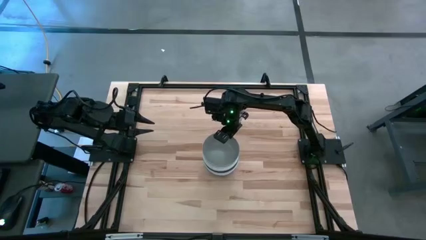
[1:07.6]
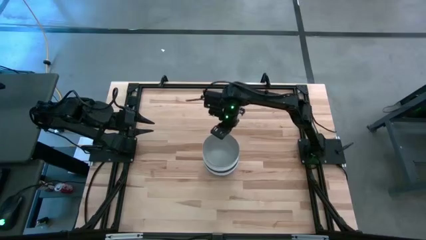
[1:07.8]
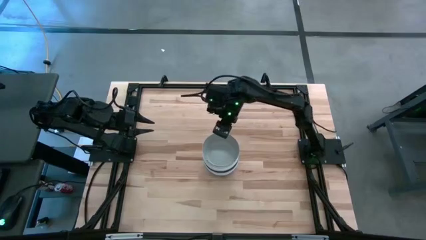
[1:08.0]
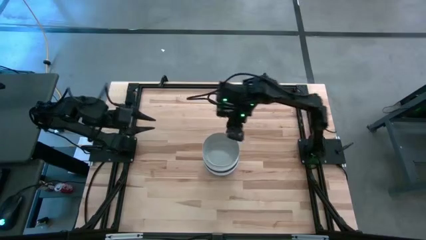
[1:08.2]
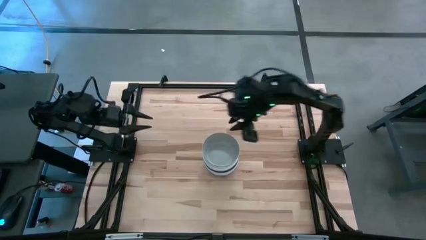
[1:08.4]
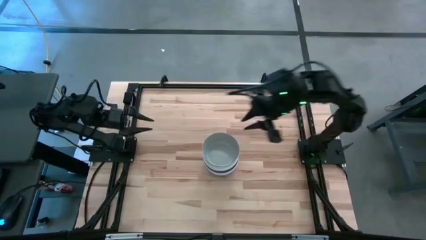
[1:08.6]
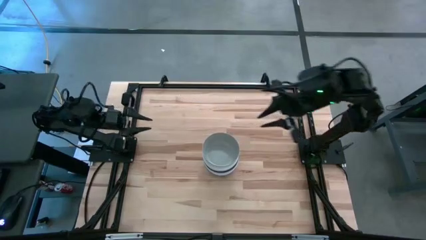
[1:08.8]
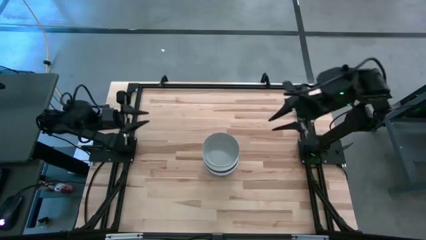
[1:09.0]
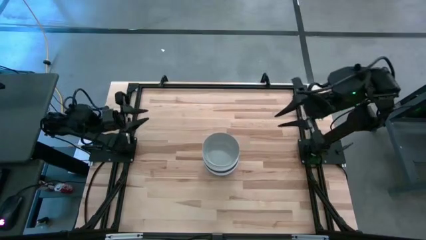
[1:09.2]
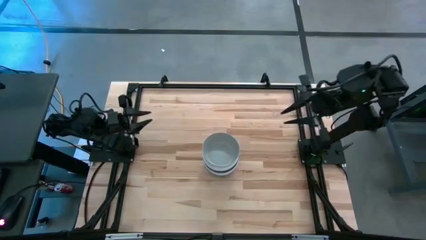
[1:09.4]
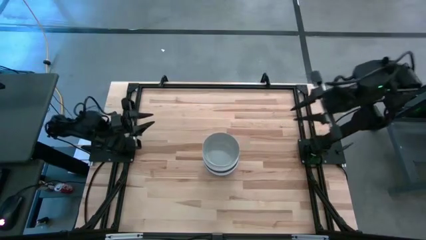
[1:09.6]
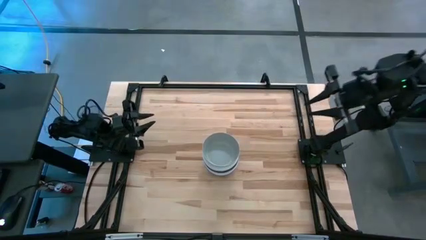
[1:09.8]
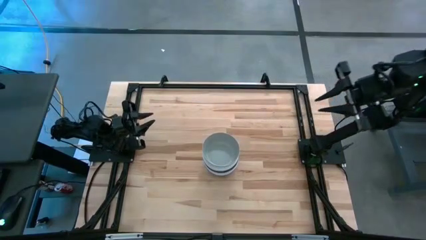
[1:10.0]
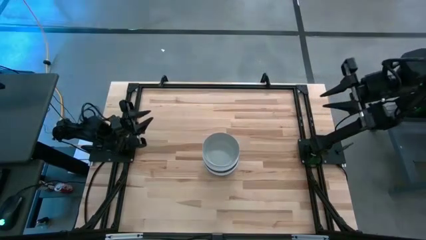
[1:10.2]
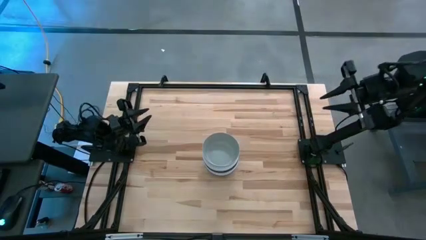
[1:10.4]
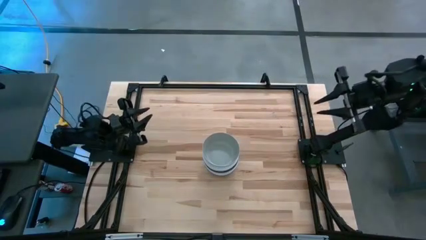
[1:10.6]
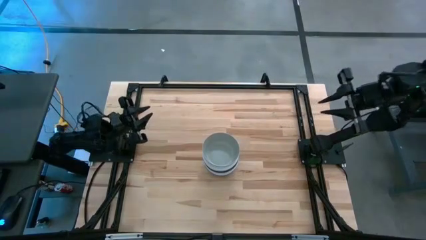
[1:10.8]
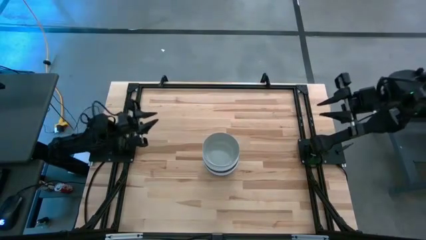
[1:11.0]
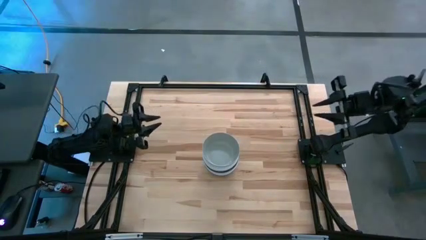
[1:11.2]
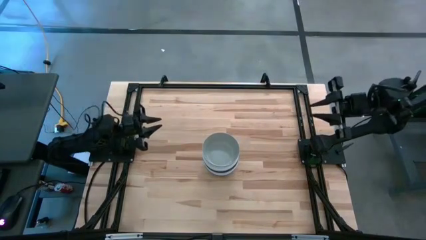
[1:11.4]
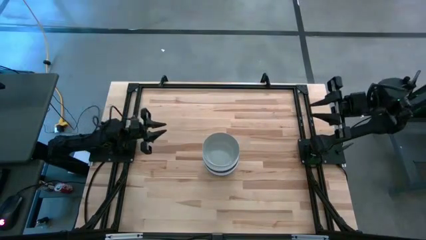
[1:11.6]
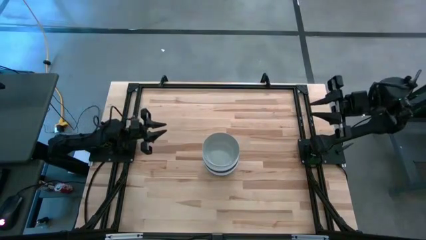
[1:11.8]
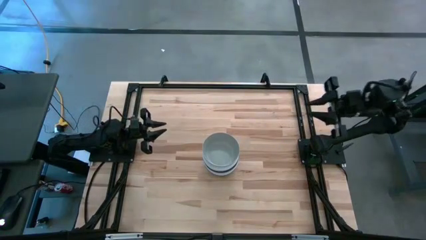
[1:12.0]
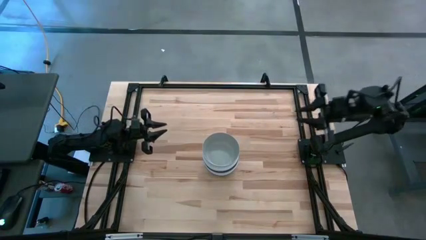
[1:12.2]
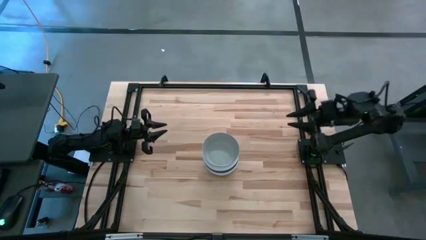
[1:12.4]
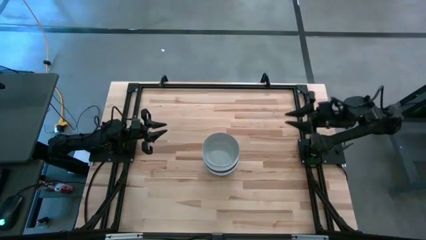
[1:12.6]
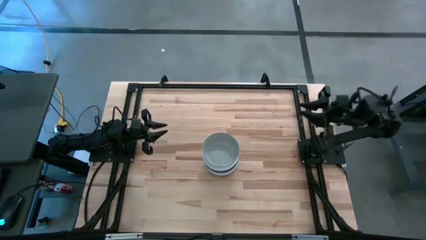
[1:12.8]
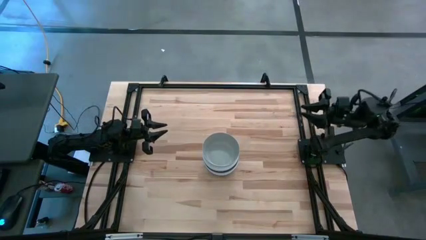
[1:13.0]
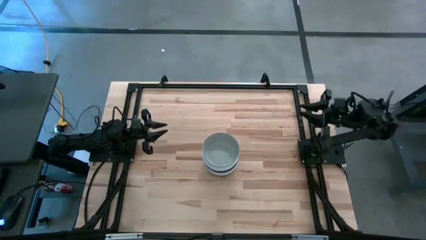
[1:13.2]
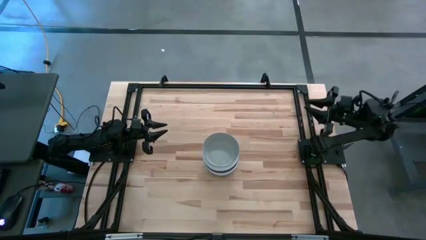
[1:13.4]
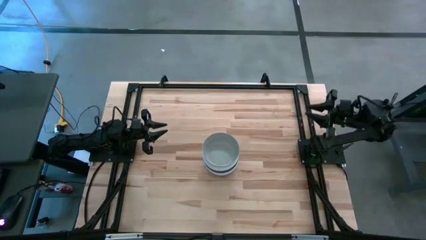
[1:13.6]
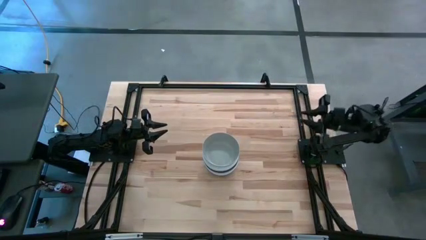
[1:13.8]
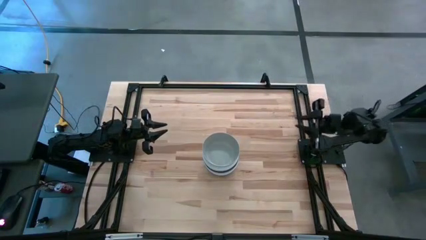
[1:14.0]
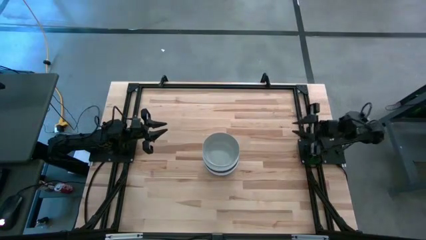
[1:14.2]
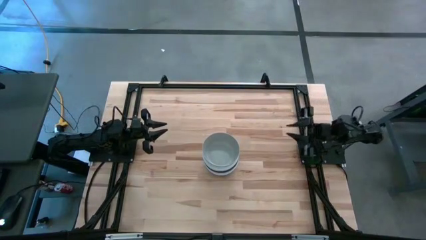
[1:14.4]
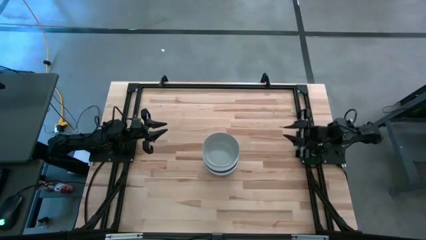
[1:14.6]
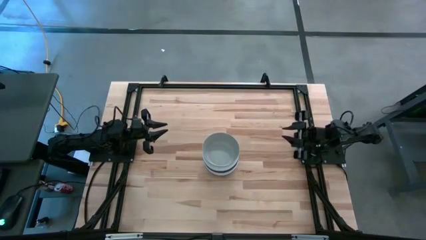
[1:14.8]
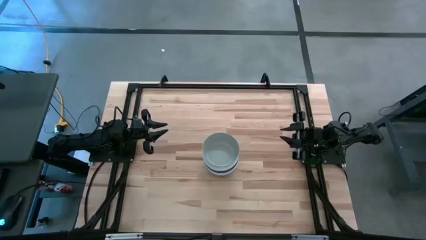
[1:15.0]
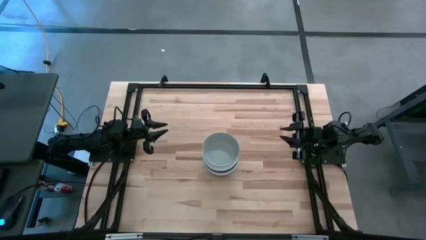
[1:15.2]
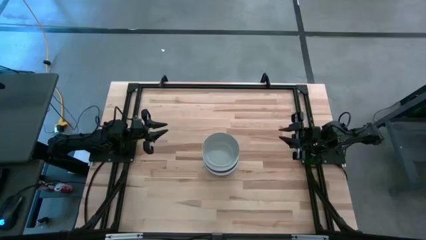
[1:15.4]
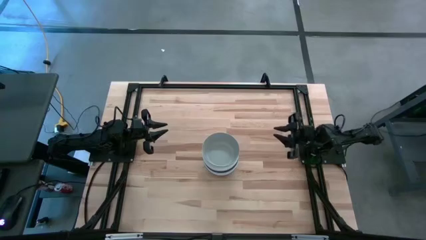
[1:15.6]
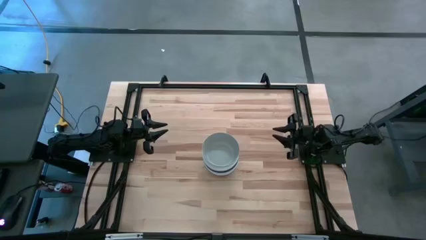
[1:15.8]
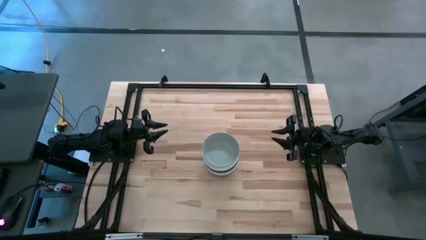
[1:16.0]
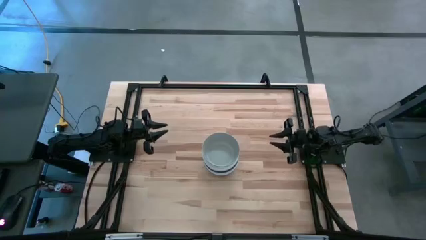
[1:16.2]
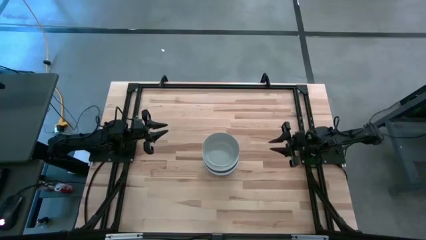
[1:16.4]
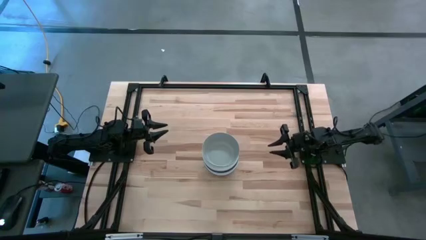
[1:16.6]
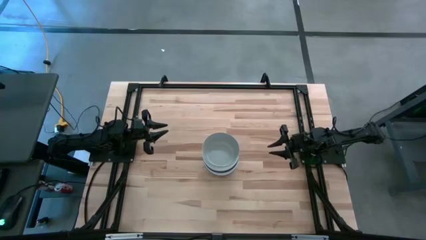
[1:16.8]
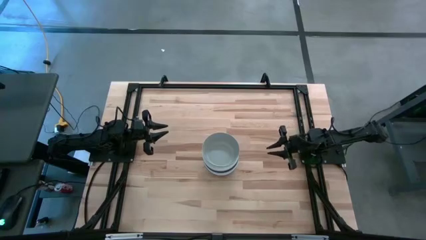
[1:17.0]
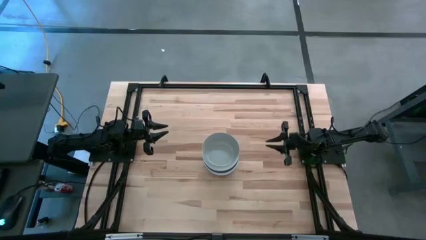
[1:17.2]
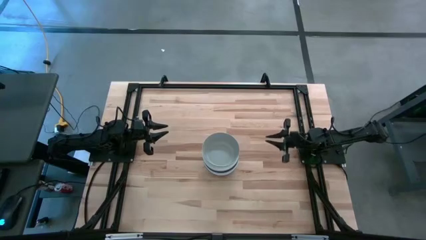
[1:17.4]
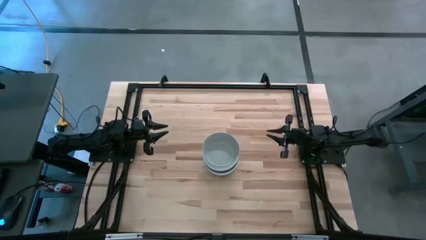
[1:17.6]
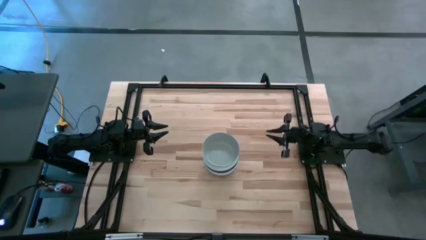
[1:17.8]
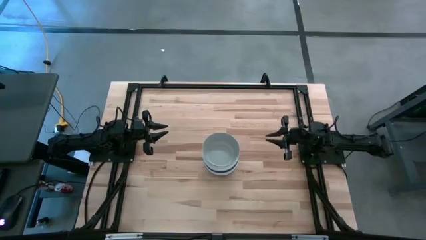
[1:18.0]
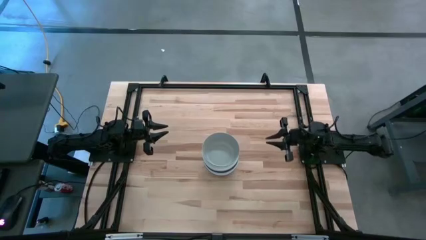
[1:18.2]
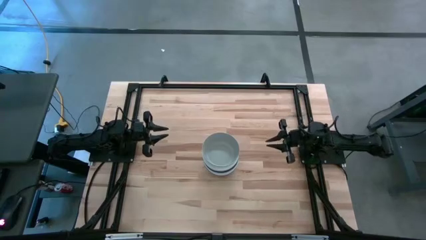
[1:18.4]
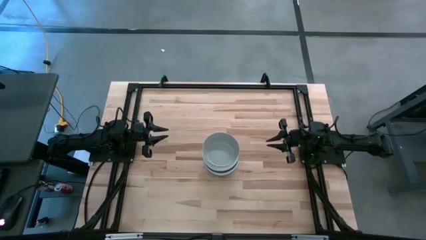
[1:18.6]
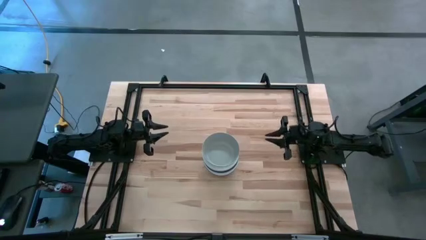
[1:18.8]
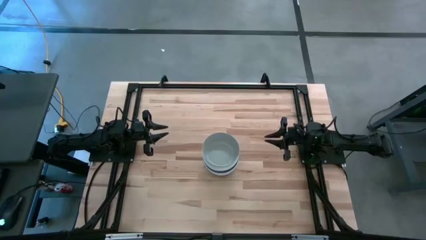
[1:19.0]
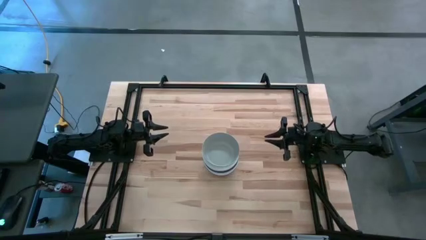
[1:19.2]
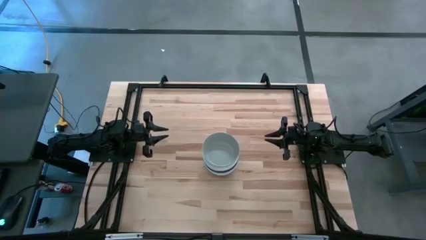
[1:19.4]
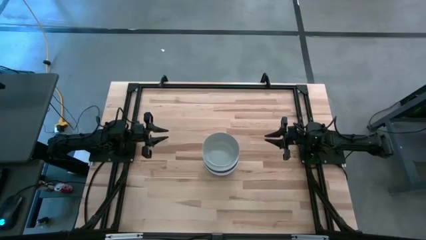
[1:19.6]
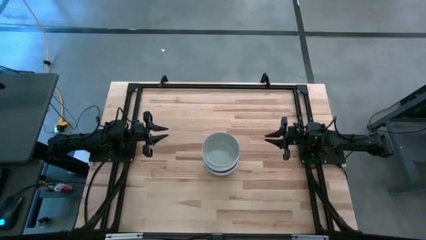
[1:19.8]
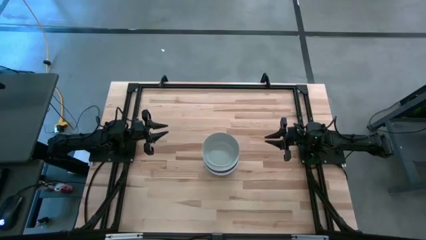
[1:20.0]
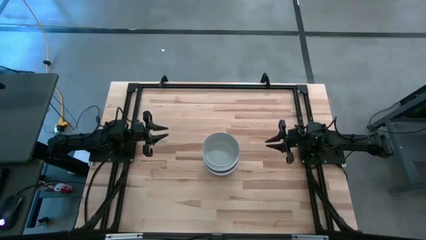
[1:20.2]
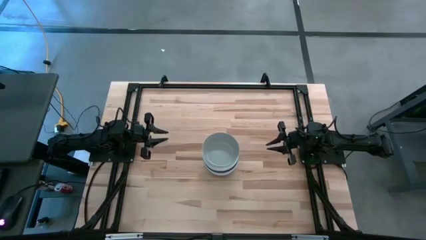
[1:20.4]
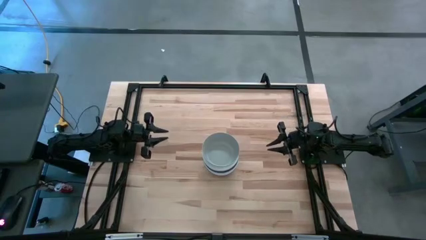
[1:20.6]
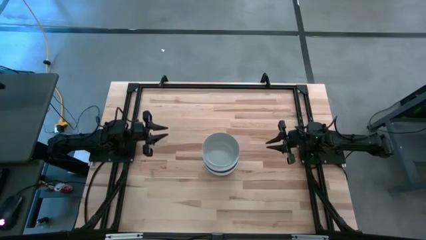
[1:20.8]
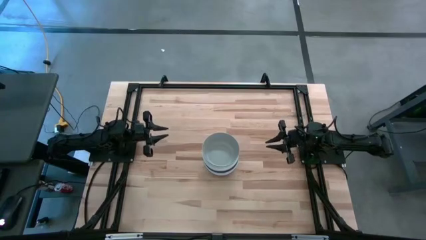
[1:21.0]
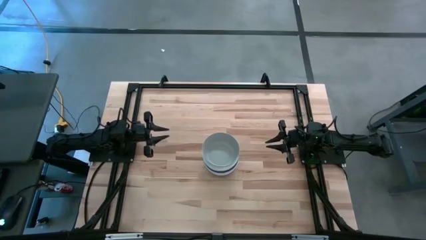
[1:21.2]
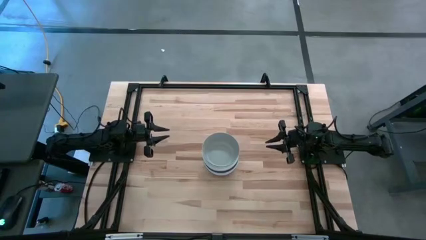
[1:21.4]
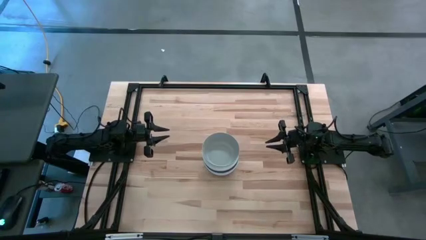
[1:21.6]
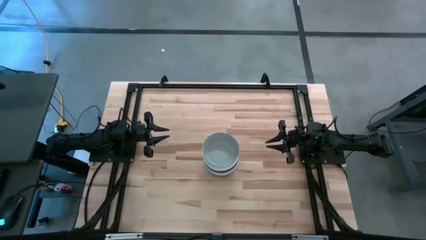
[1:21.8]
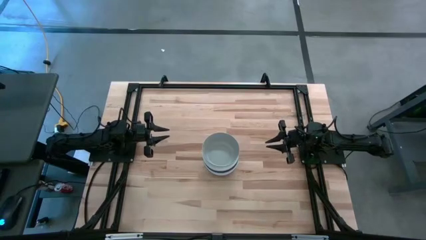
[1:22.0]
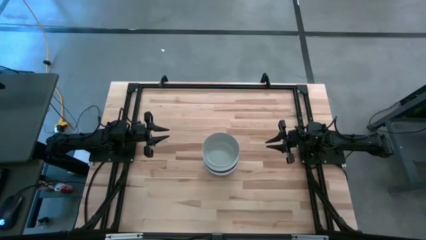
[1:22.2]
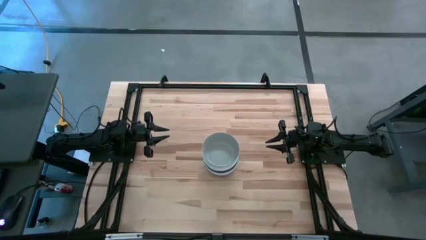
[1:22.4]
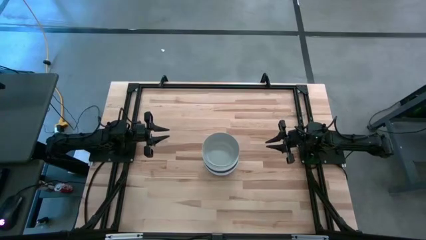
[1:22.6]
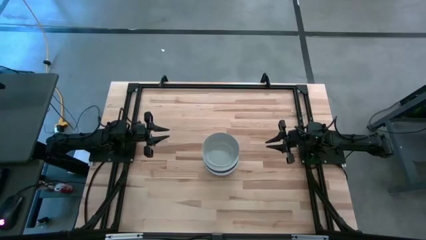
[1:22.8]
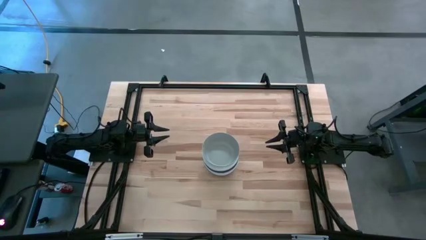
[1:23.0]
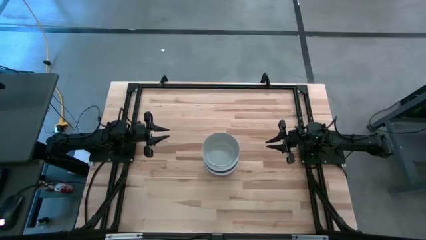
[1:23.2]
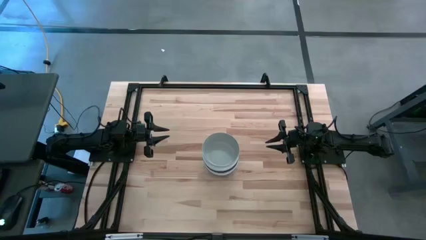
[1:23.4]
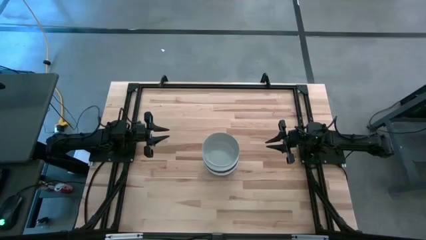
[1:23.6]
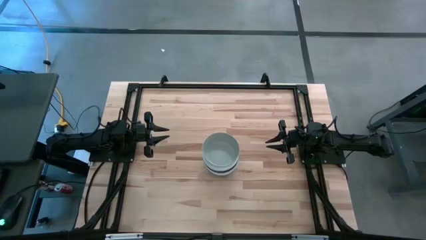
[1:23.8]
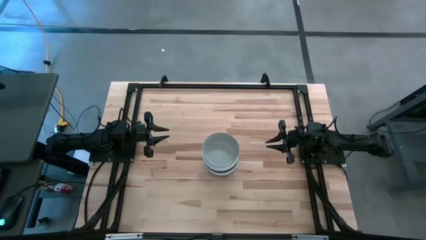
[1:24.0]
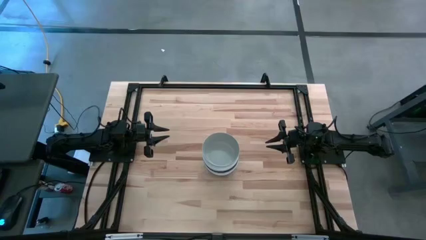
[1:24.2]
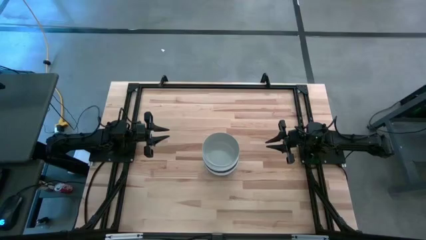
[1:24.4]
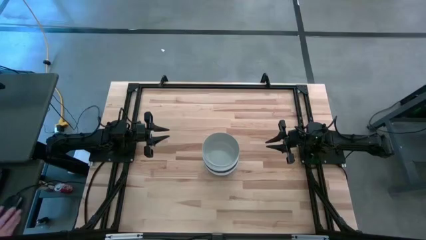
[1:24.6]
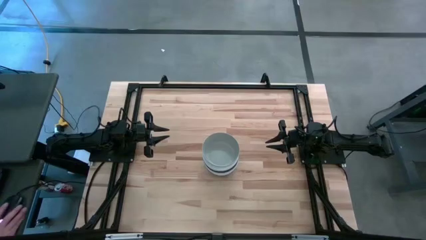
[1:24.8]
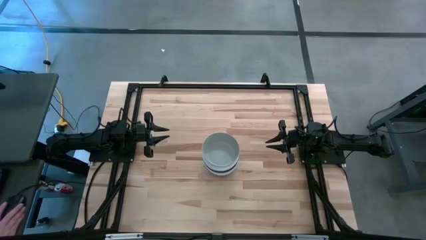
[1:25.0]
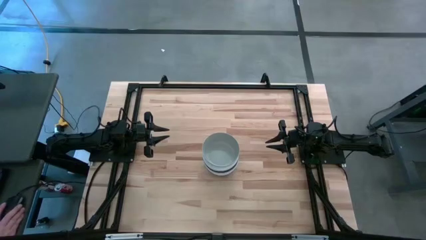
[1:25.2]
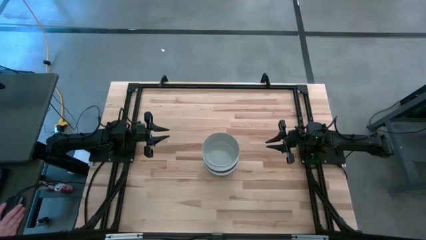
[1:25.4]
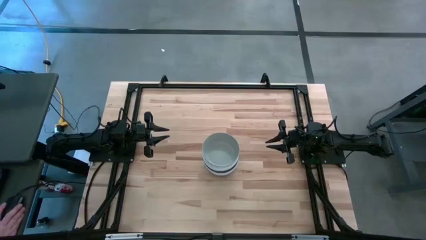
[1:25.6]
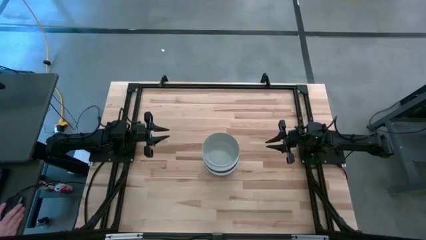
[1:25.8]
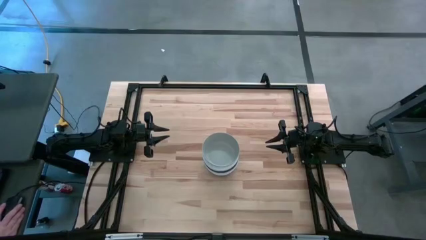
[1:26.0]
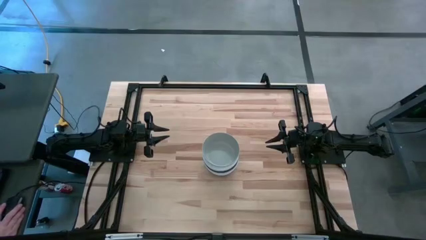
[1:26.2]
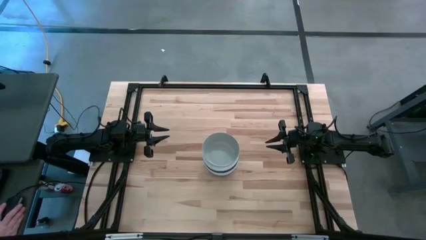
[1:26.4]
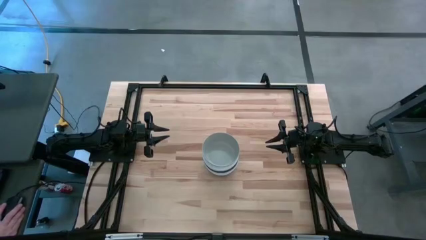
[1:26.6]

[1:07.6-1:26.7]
Task: Nest bowls inside each other
Return to Home Position
